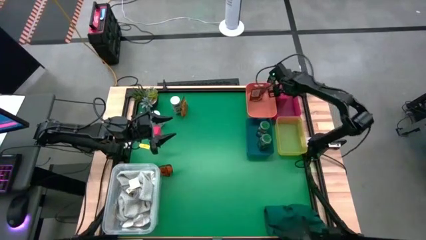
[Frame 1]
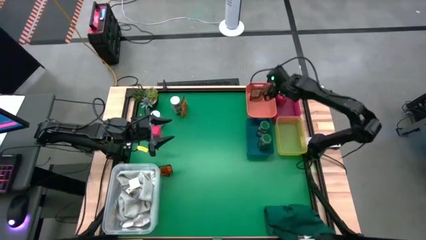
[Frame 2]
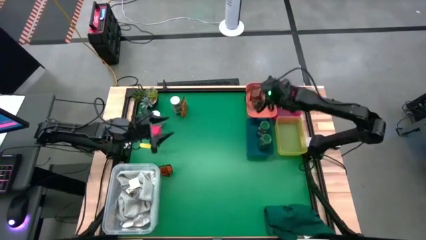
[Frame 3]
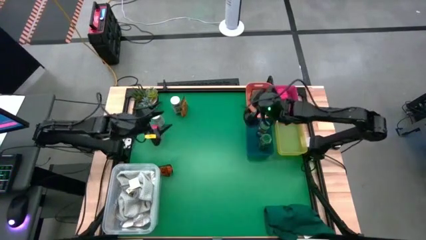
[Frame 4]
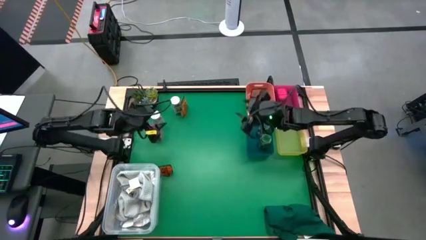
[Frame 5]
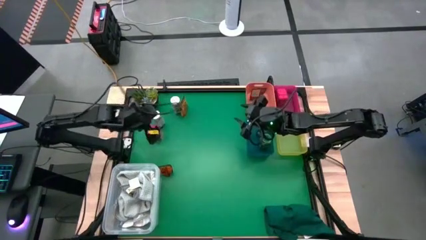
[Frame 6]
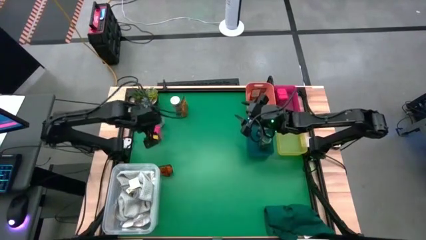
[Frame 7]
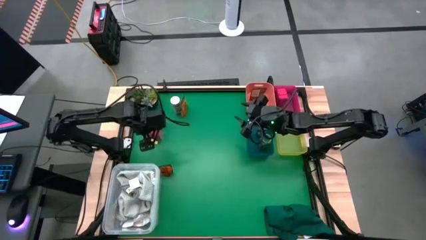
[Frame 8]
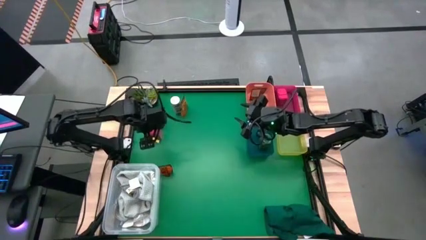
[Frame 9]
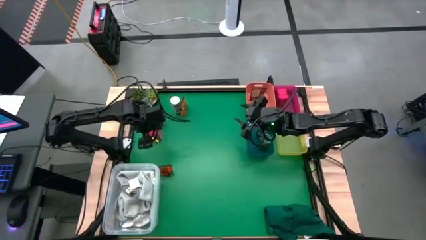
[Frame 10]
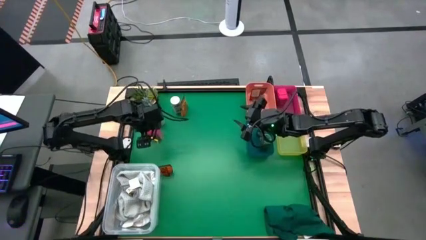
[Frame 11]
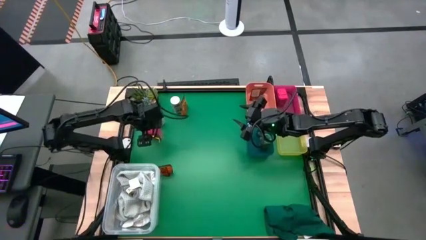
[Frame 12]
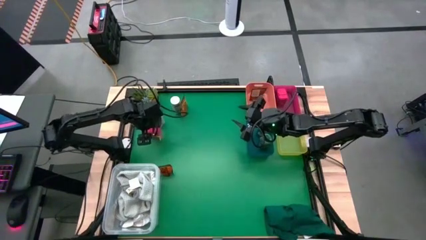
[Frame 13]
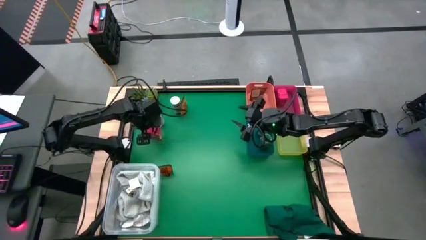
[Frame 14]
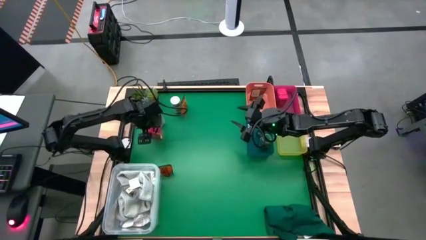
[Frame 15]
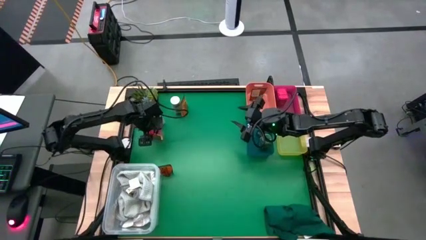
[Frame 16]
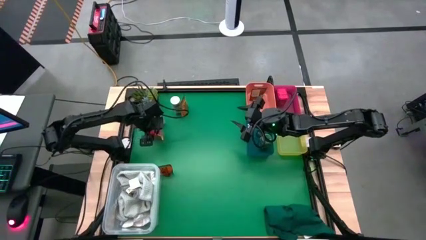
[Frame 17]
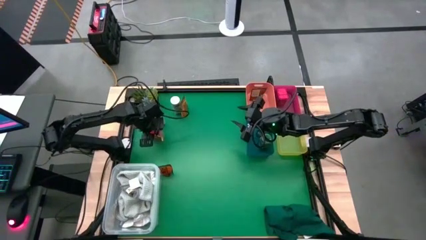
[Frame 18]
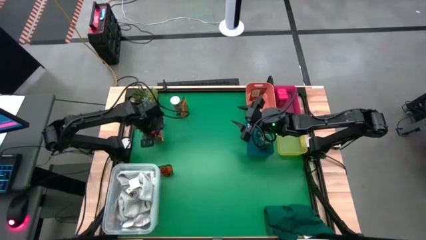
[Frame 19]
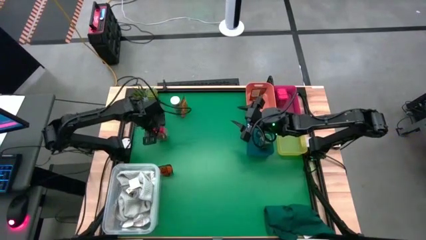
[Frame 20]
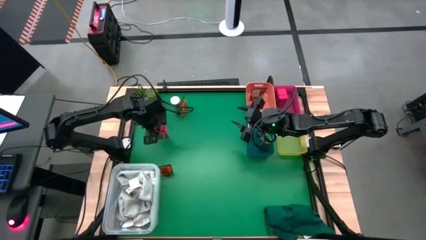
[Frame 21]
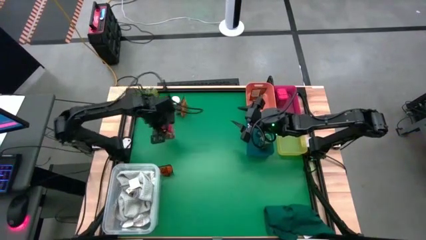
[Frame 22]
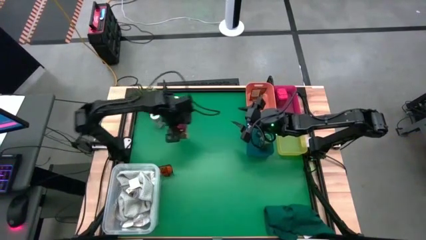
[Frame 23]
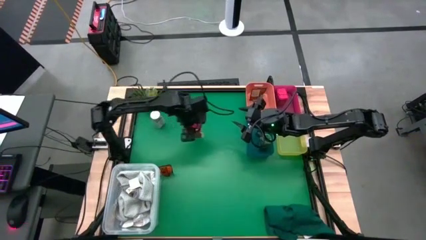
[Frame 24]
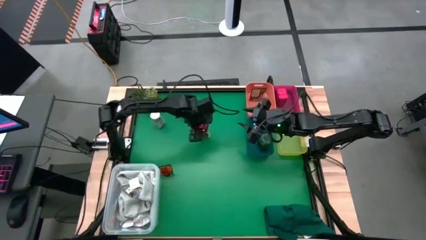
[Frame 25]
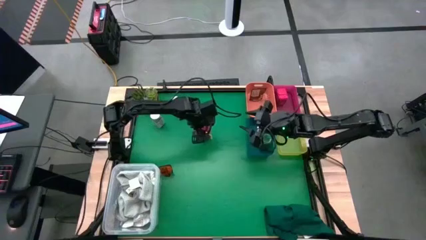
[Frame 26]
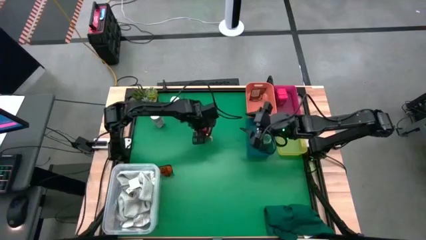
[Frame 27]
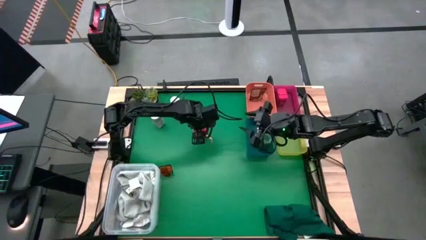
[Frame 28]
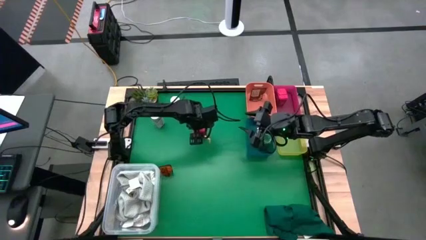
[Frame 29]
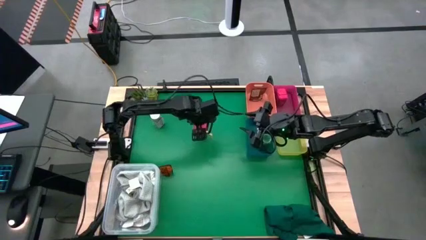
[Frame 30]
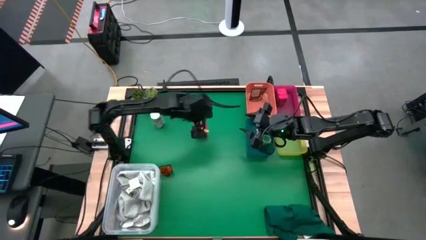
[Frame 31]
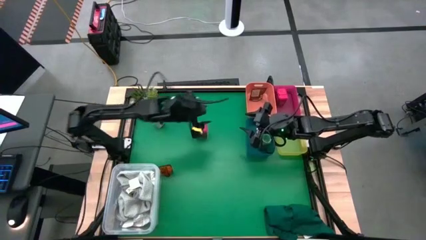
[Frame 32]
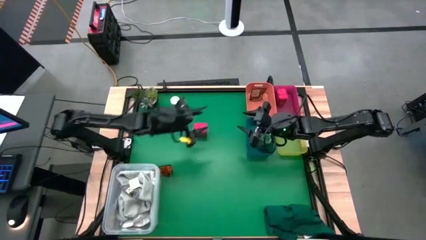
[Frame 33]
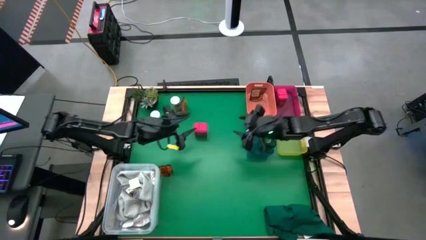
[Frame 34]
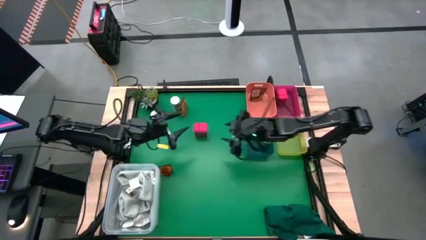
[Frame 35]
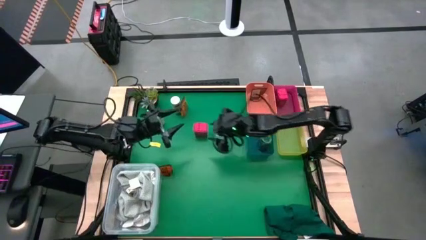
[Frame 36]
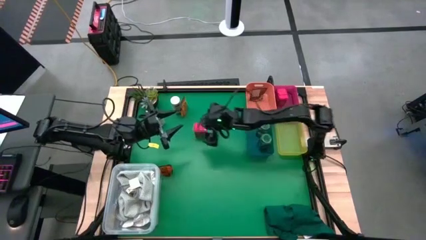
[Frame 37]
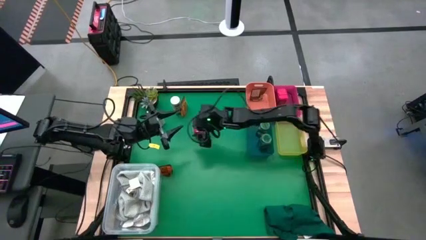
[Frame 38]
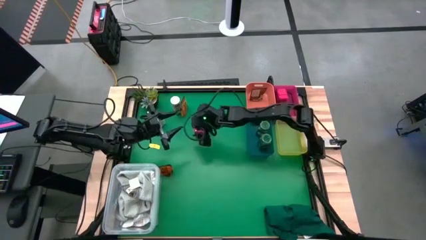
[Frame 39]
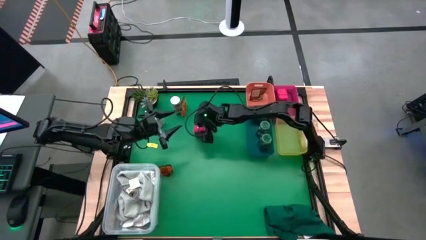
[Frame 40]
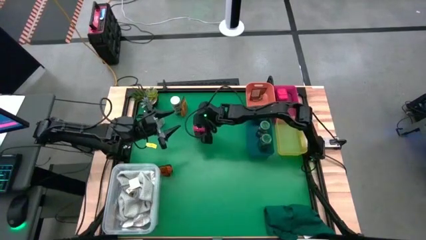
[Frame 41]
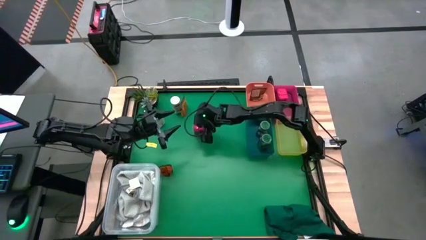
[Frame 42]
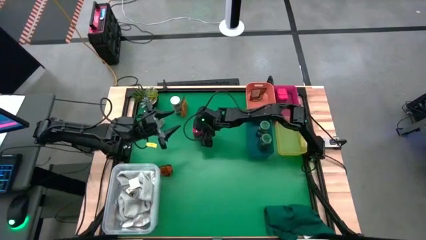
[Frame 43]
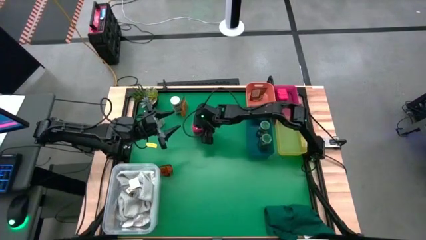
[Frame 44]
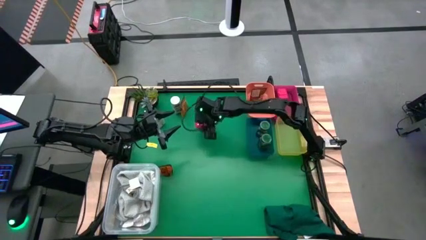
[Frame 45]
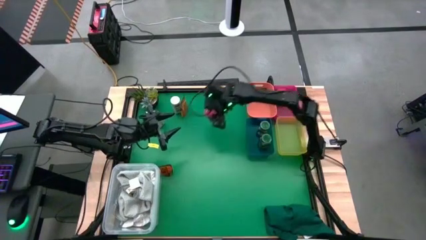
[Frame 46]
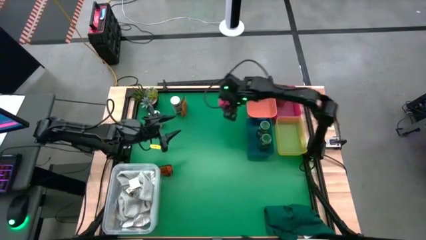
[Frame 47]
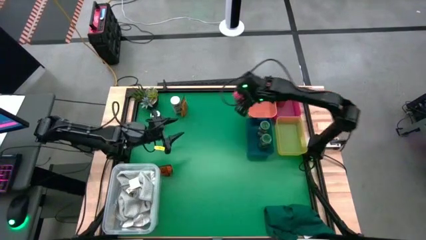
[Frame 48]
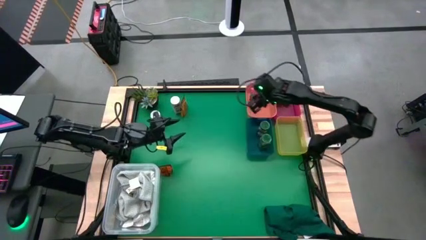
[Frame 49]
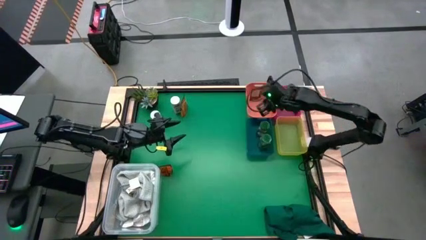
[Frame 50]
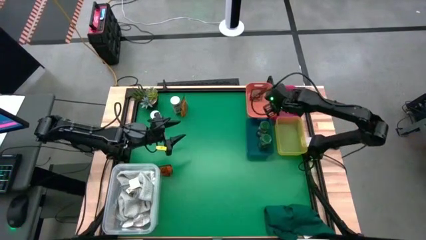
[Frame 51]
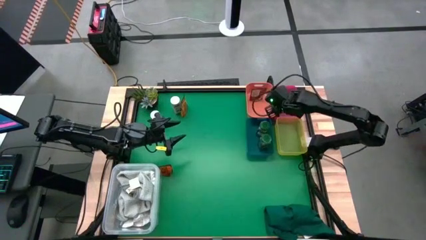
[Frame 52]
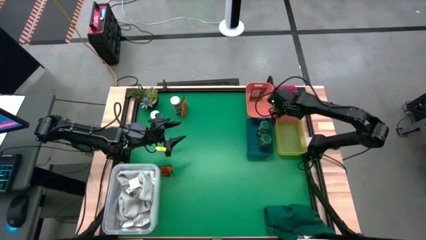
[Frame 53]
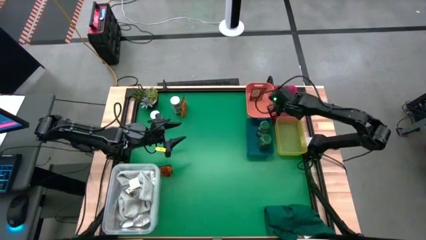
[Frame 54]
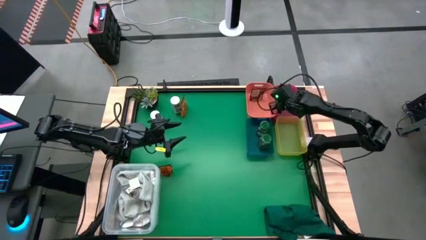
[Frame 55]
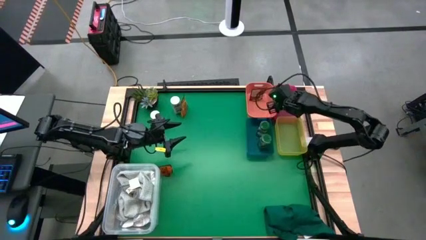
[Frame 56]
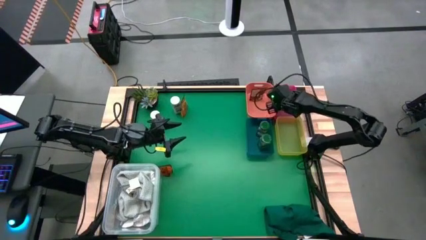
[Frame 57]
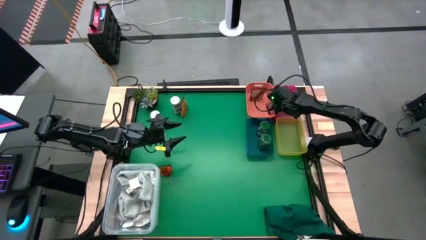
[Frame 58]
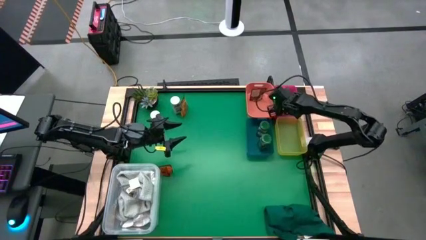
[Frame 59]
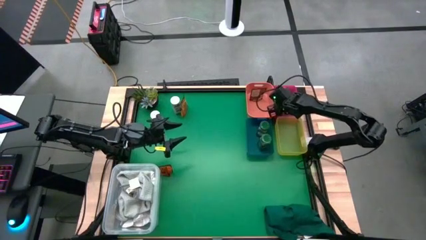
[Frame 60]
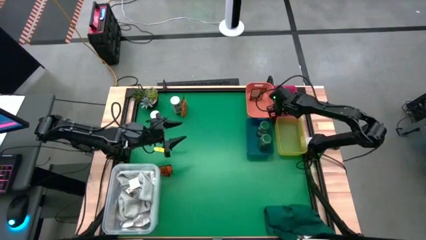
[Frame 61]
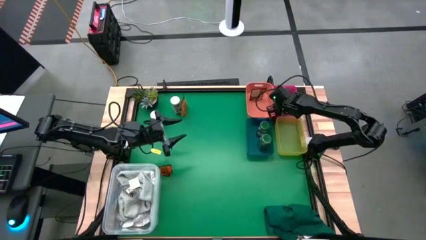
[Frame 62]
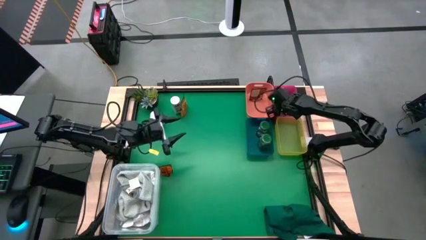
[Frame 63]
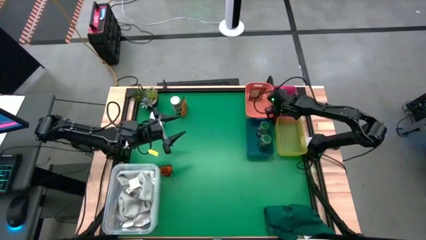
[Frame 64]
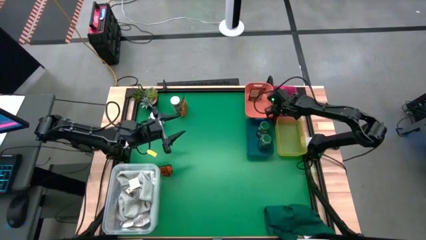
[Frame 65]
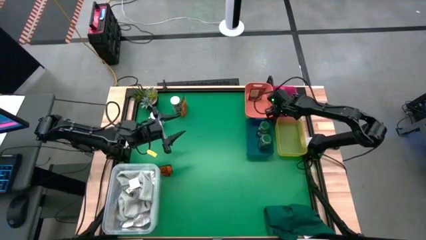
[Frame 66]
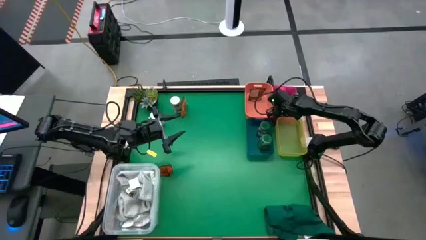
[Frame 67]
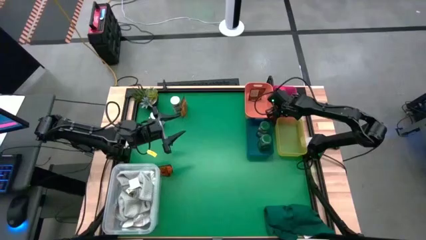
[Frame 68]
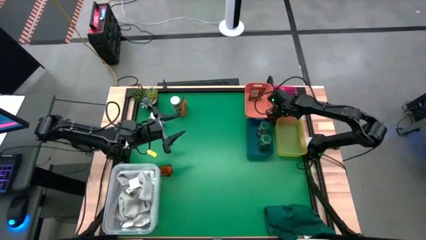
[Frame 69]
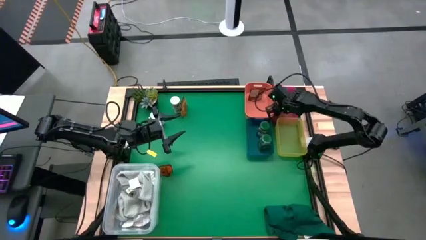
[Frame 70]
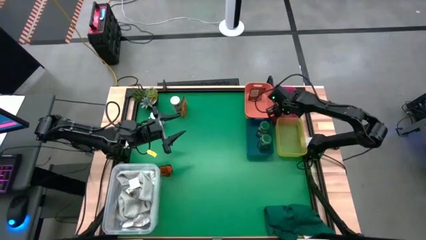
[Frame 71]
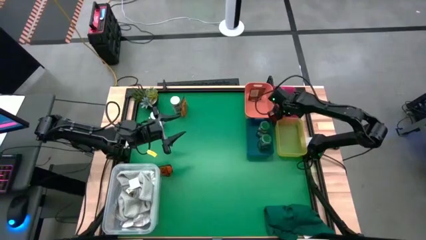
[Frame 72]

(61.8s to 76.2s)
Task: Sort spices by type
Put the red seasoning bottle into the red bin

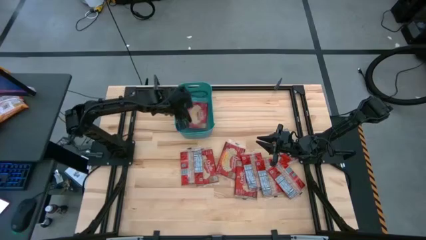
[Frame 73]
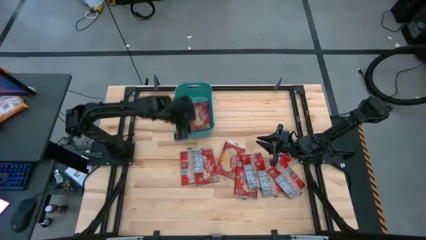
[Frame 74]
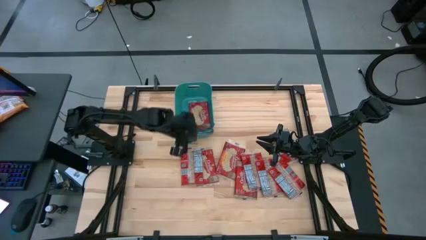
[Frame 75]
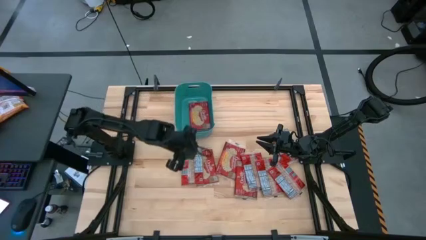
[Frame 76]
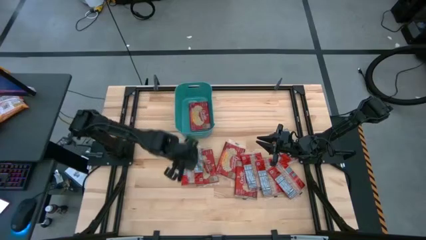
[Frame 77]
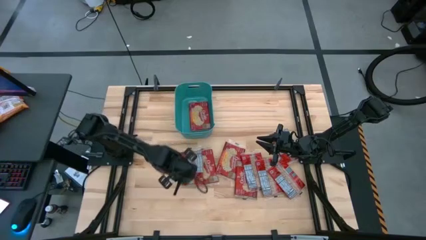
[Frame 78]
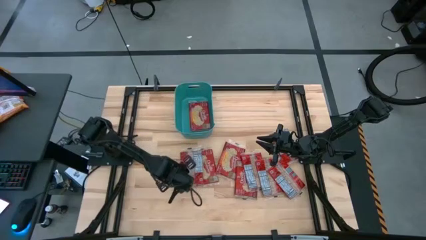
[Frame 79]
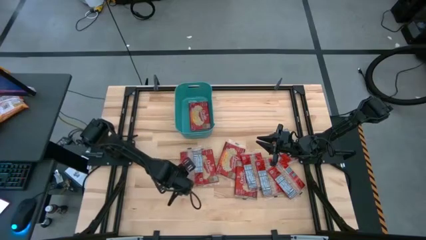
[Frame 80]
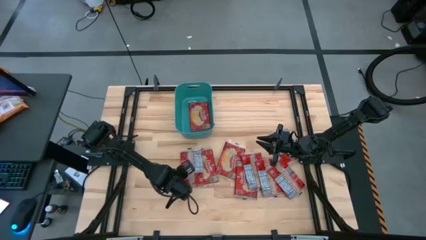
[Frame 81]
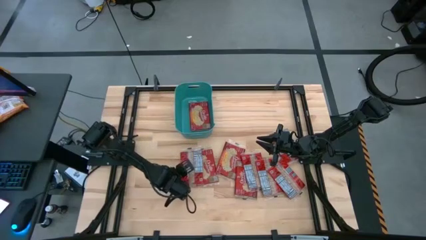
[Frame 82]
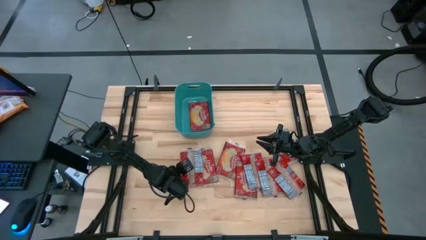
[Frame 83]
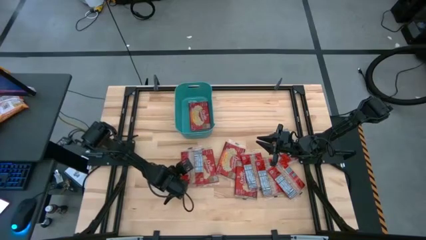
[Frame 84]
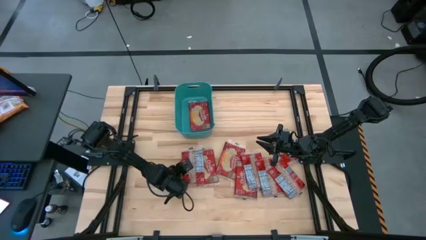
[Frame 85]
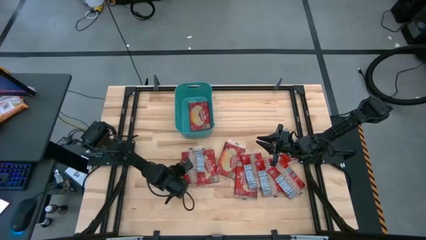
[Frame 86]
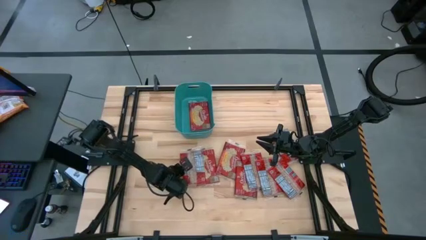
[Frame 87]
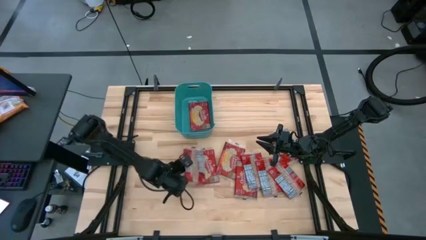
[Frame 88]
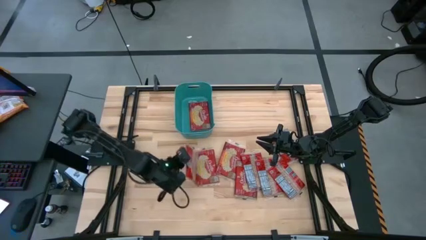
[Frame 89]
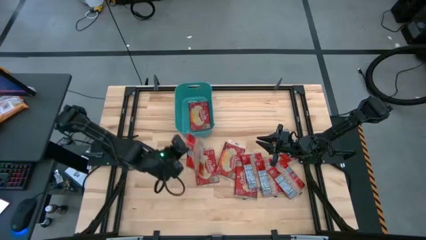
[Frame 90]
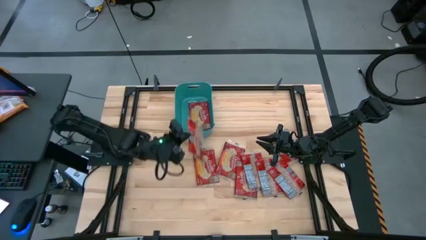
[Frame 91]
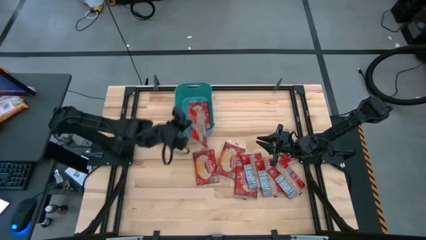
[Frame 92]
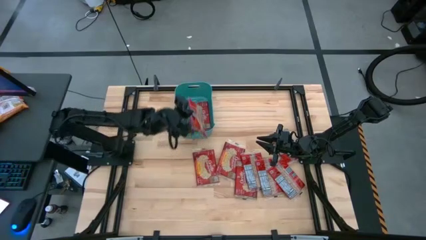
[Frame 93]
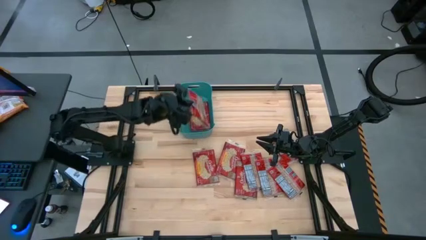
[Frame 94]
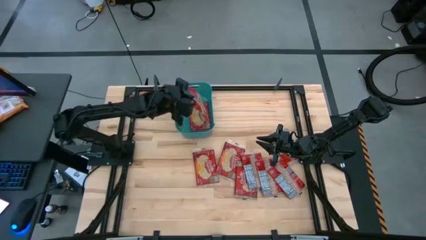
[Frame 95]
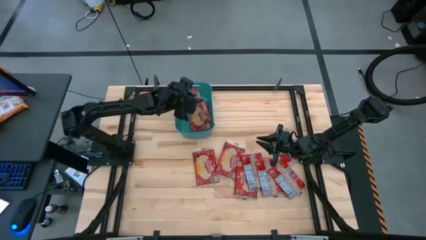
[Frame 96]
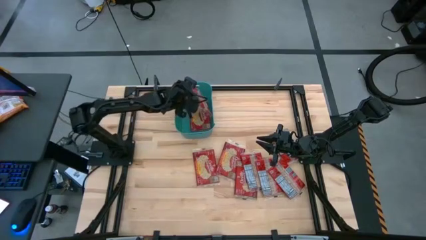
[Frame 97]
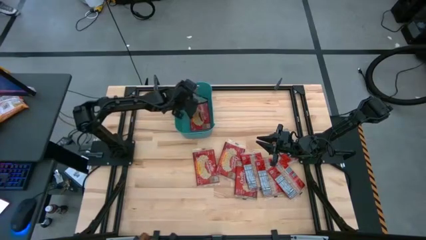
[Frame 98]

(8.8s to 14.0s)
Task: Sort popcorn bags into baskets
Put the red popcorn bag into the green bin
